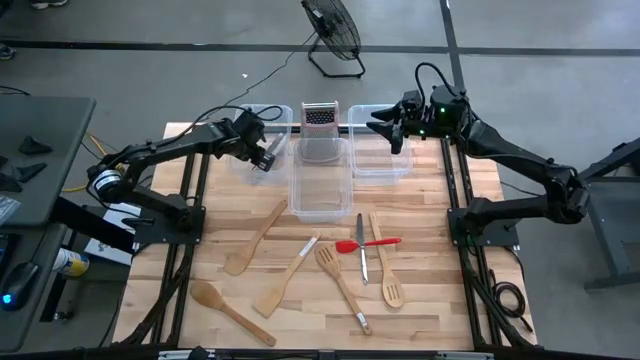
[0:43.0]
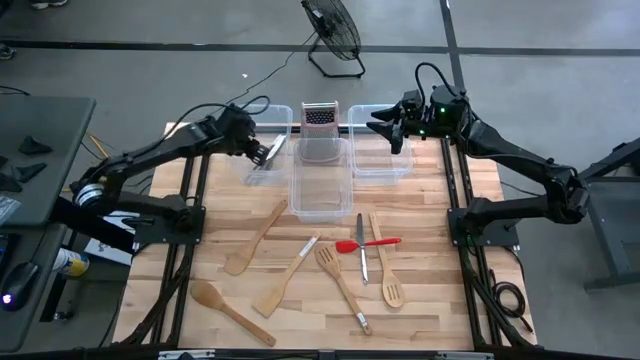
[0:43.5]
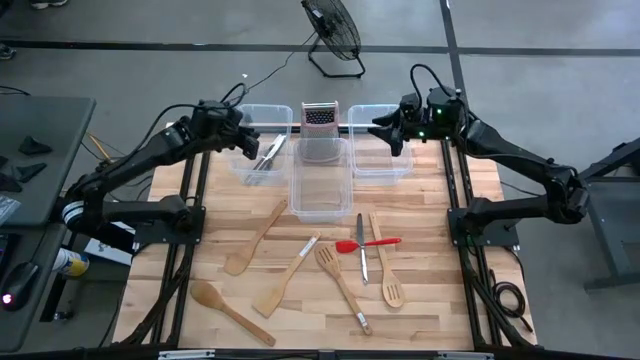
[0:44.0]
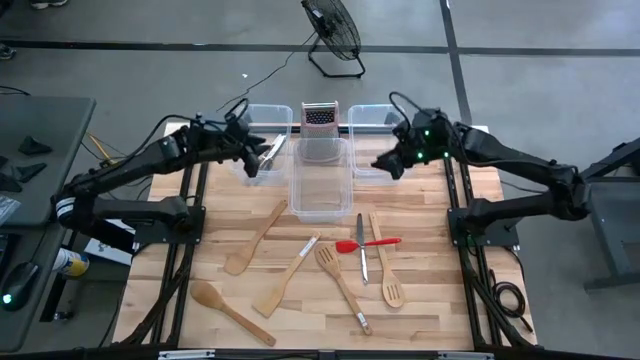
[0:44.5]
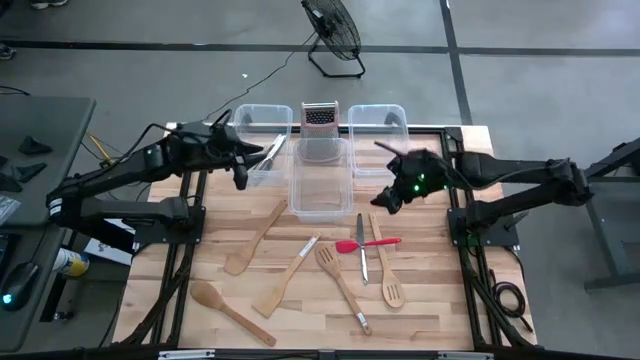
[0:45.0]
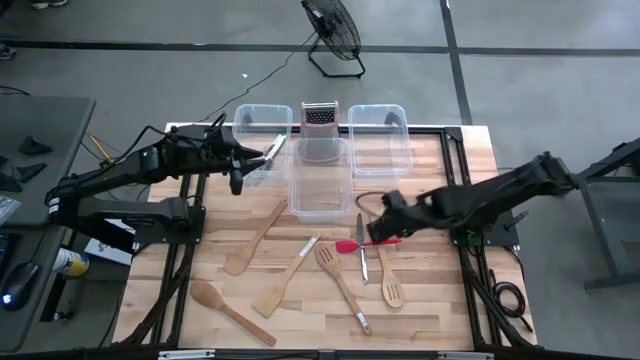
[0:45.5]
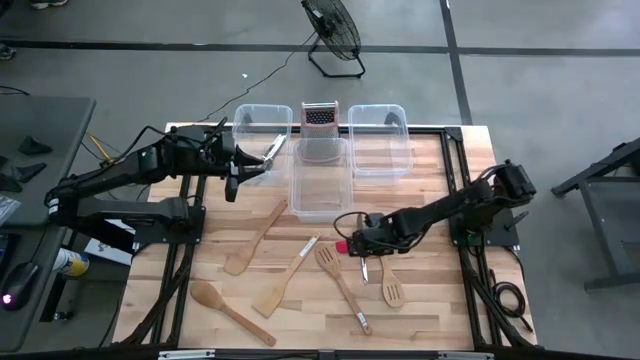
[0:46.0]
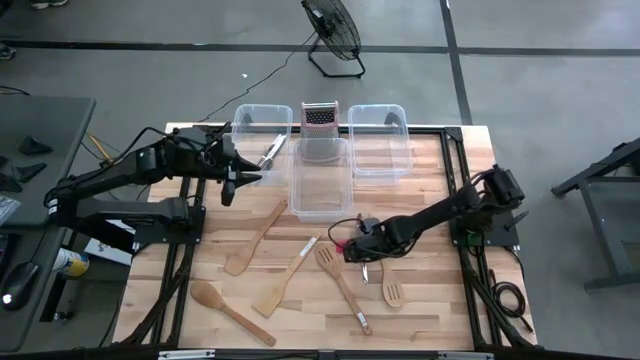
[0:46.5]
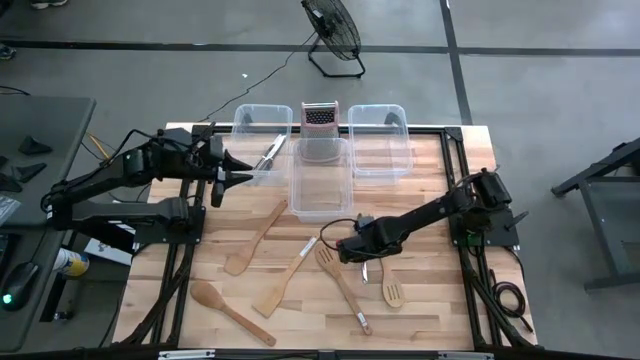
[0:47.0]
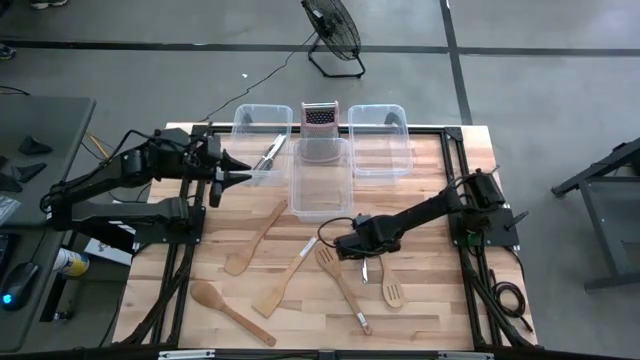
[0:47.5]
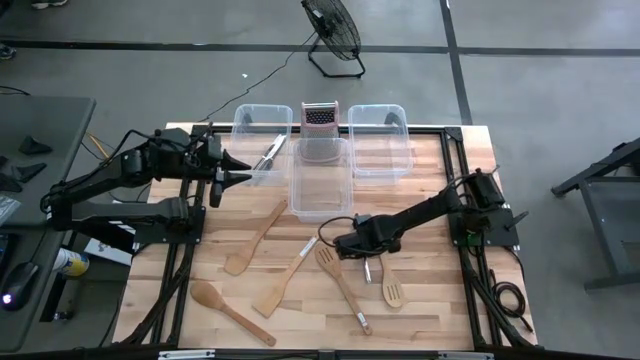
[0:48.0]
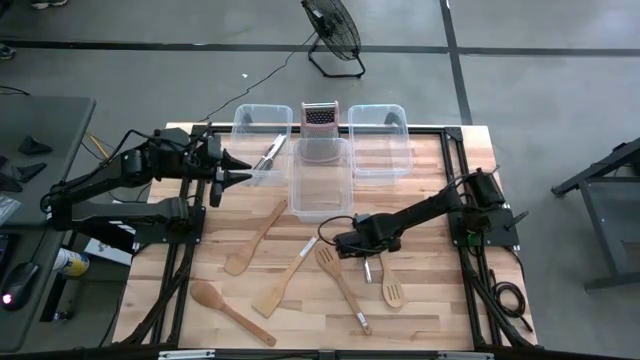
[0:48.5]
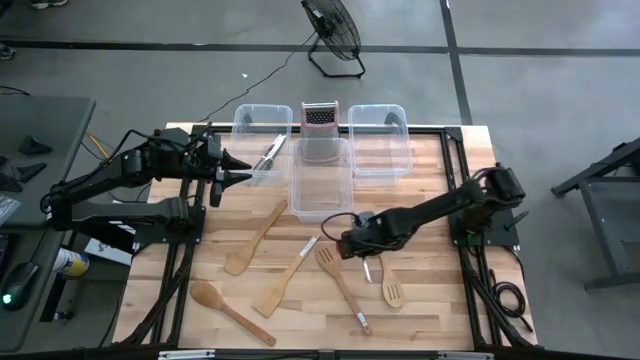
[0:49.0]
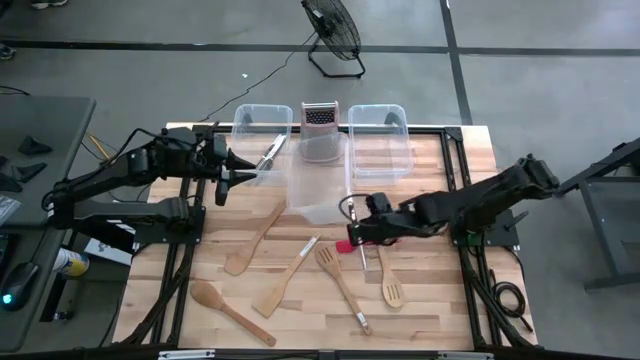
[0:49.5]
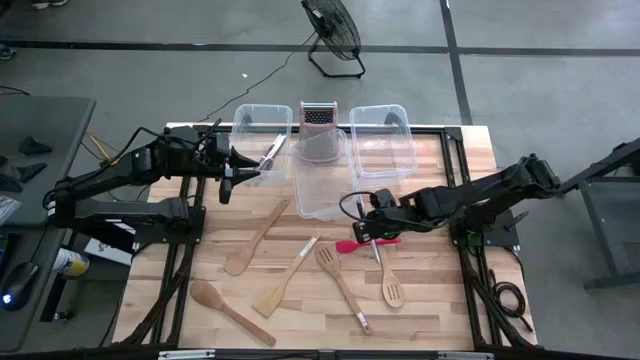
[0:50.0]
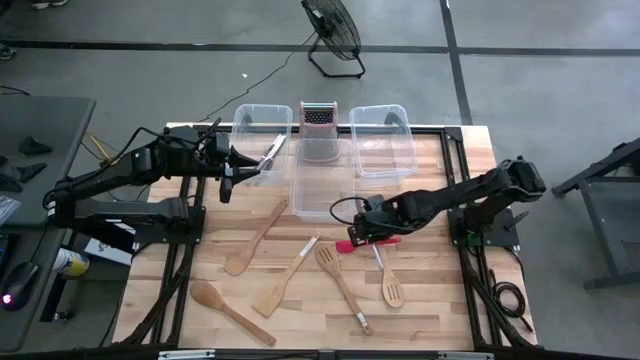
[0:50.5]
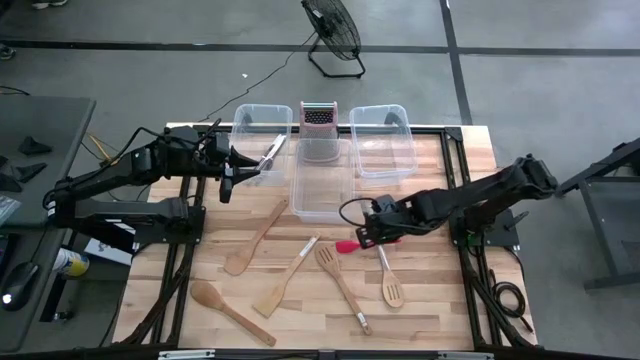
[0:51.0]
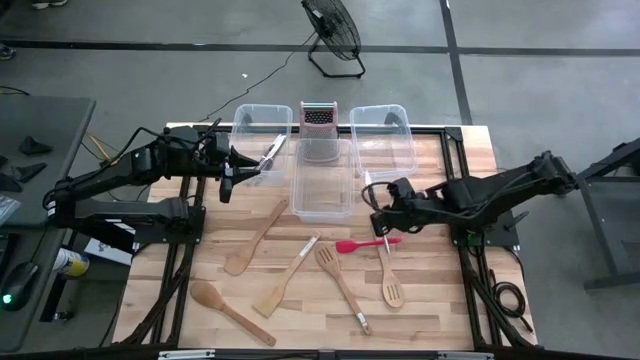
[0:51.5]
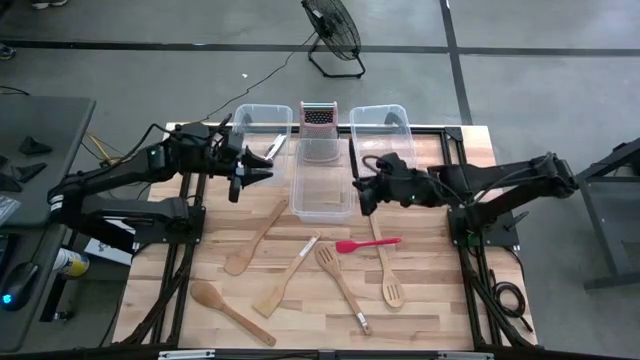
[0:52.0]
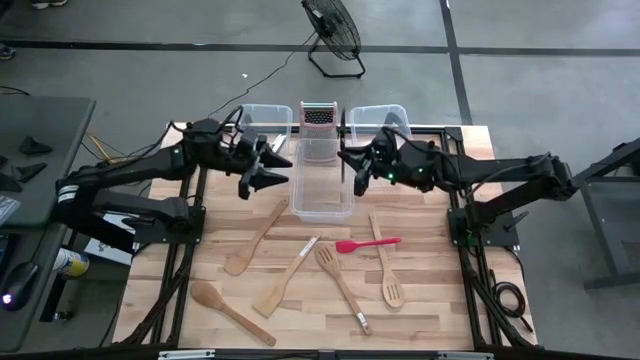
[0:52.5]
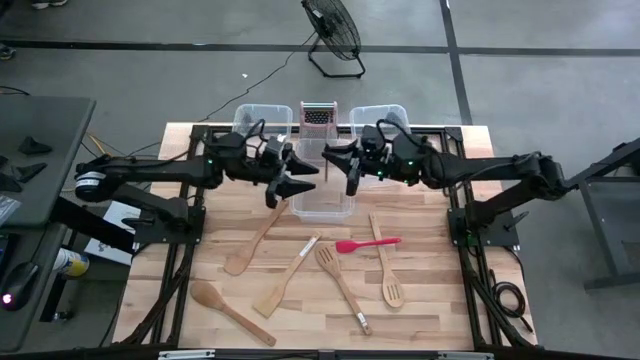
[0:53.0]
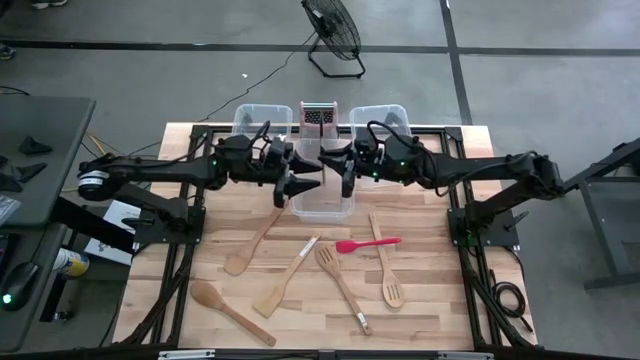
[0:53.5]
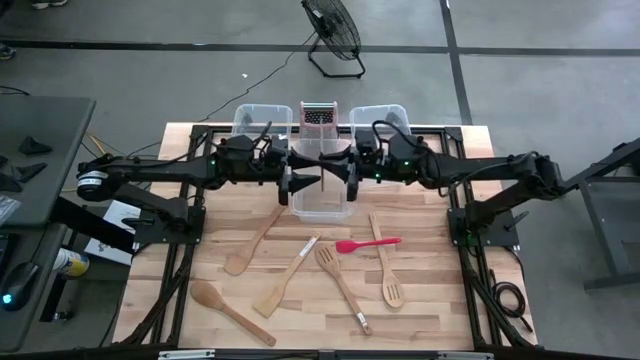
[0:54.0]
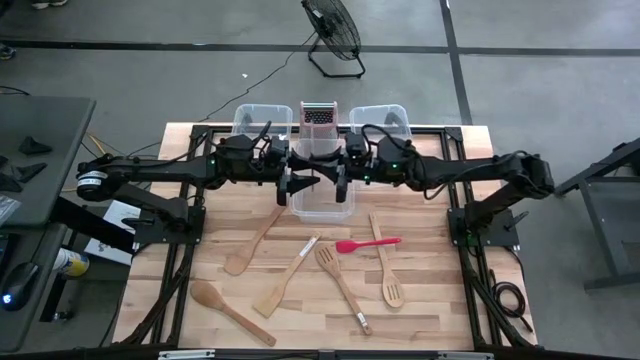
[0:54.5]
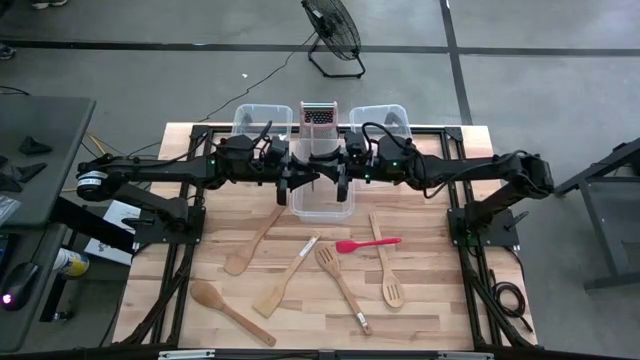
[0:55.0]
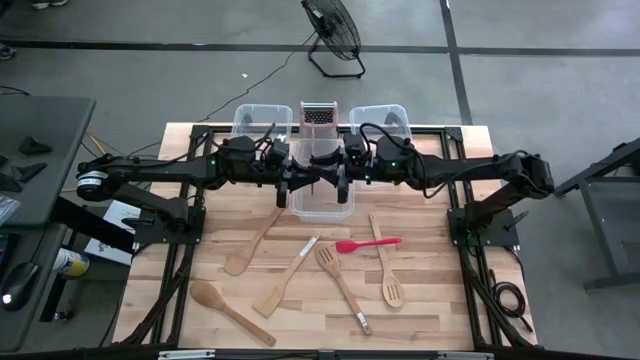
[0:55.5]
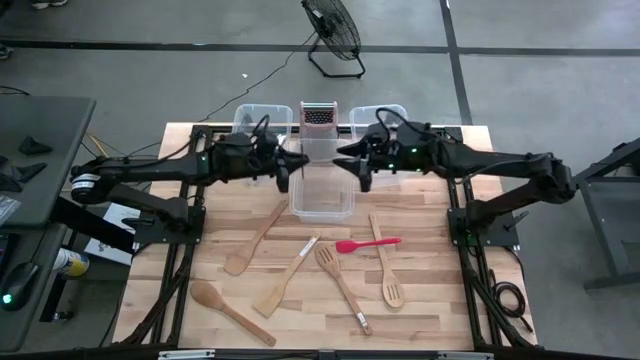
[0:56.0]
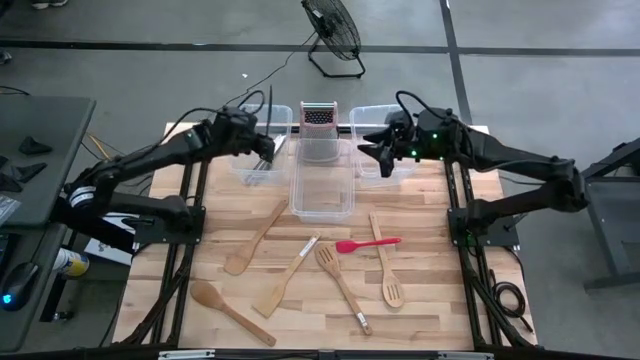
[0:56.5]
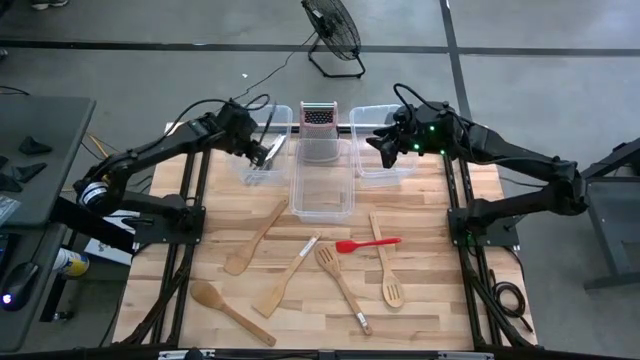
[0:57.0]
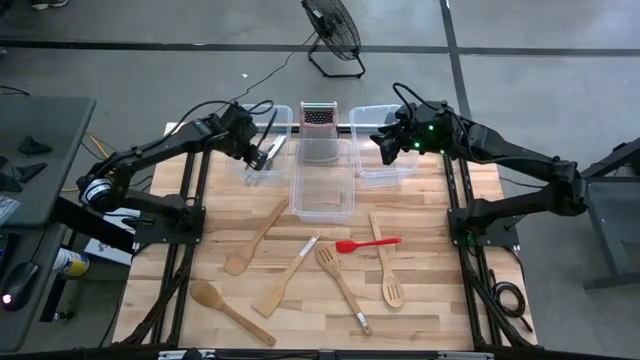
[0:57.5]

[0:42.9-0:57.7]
Task: Pick & Place Kitchen Items
Put the silver knife into the left transparent bin

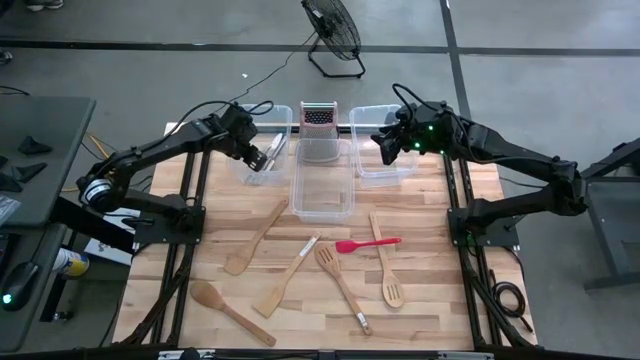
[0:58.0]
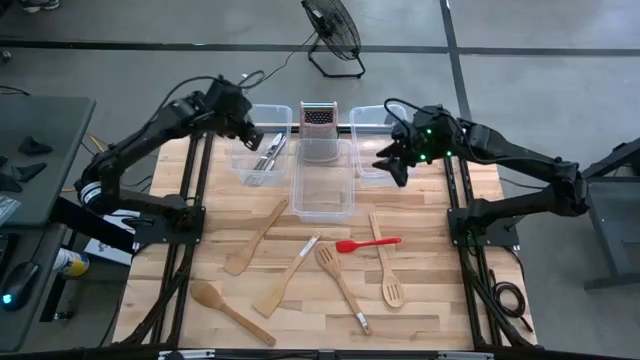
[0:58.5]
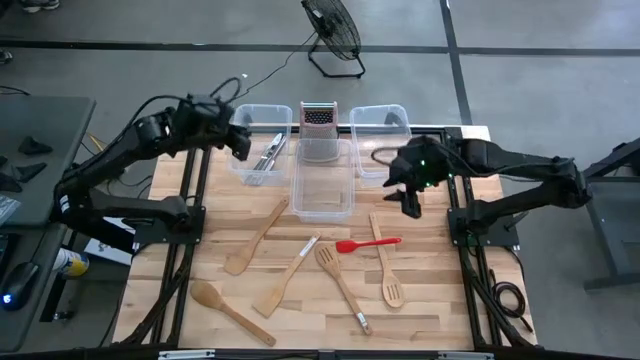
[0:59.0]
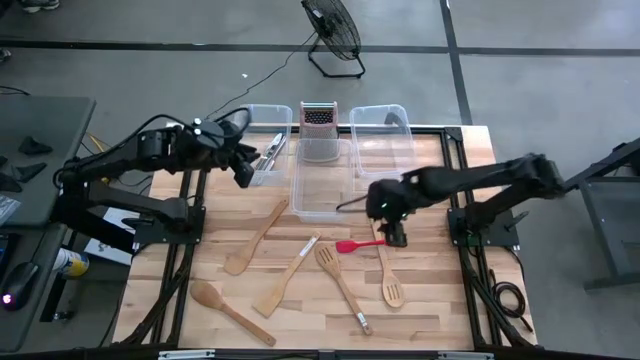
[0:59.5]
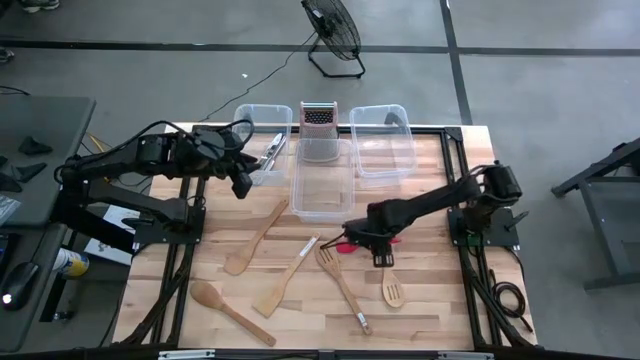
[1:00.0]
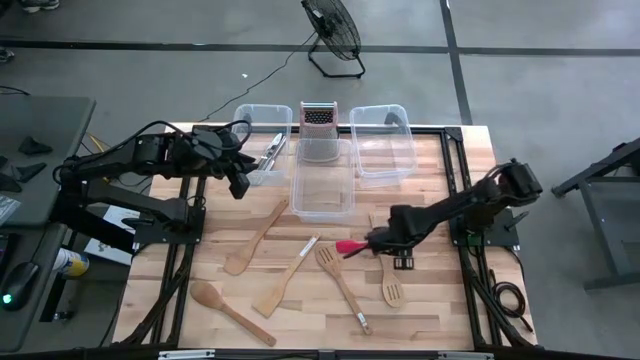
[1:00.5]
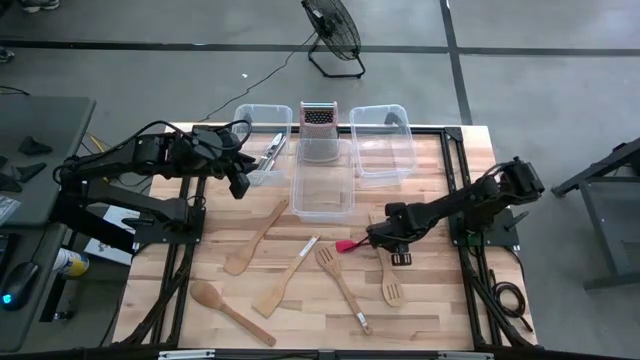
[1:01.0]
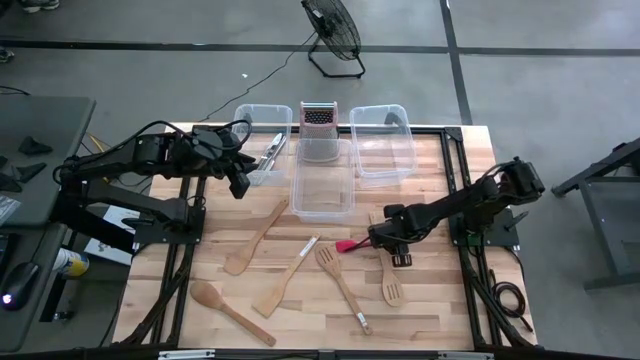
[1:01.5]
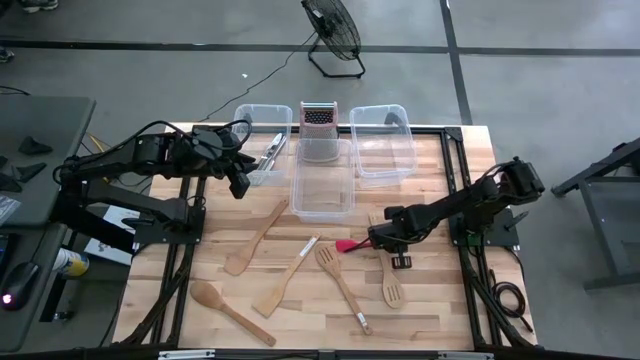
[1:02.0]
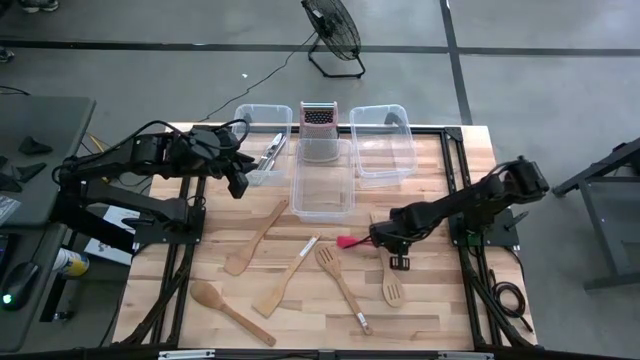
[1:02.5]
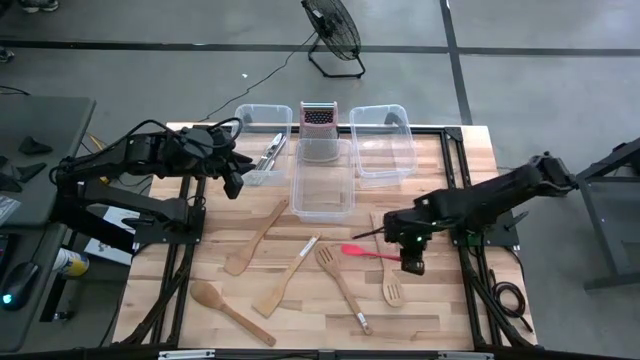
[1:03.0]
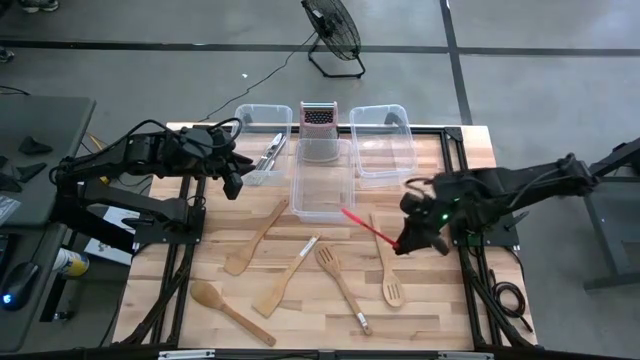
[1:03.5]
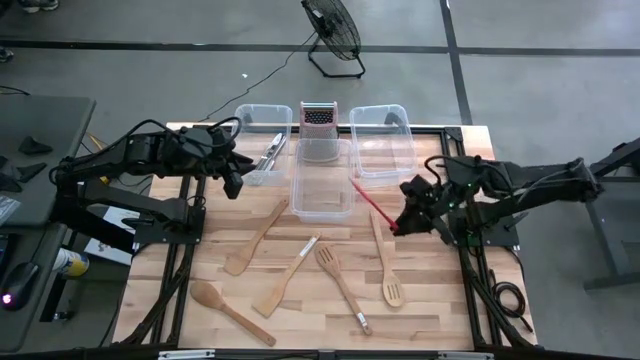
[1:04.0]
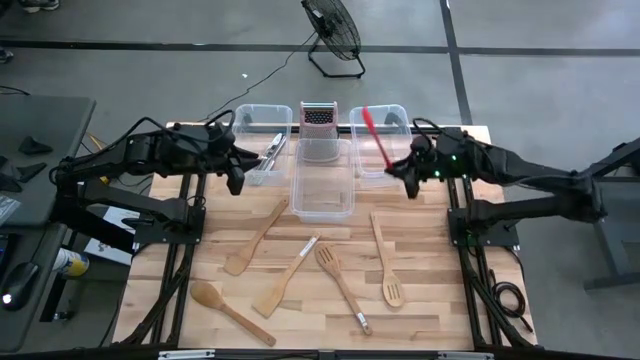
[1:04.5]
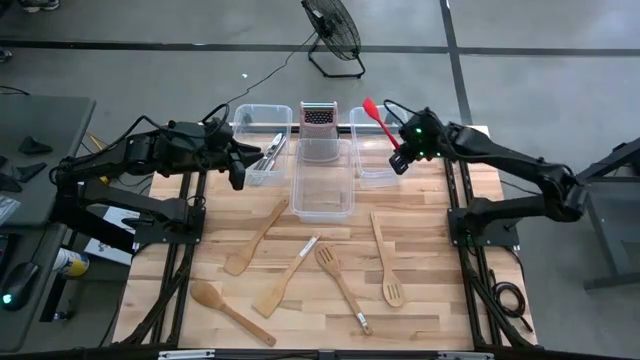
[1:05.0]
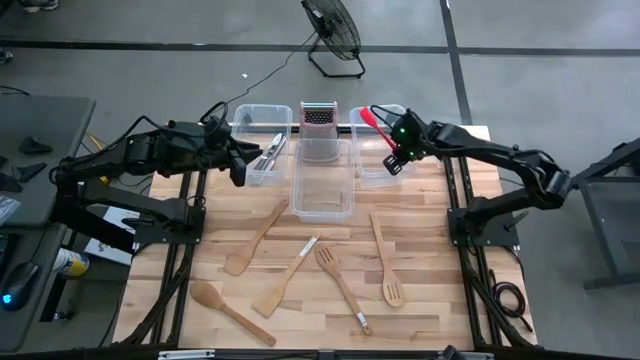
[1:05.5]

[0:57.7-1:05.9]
Put the red spatula into the right transparent bin
